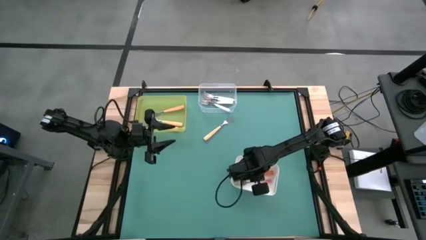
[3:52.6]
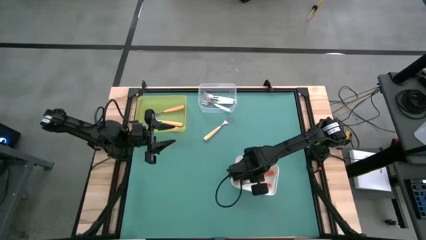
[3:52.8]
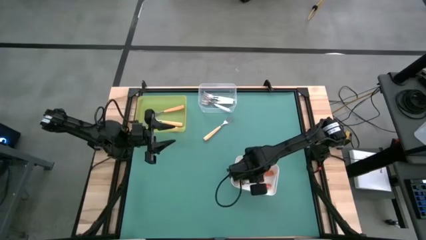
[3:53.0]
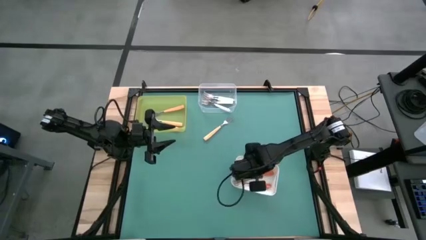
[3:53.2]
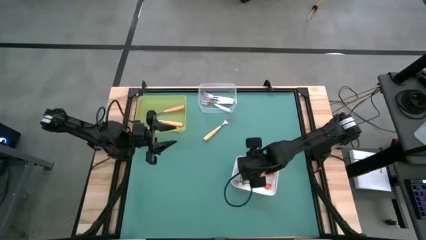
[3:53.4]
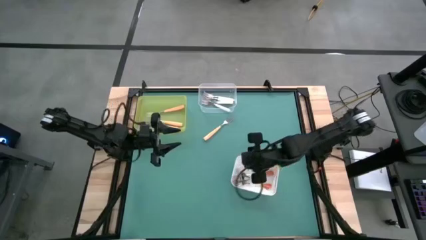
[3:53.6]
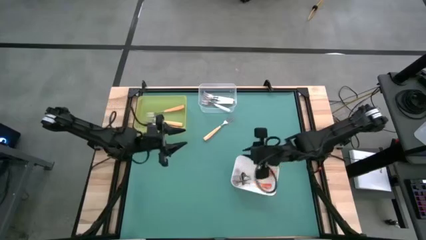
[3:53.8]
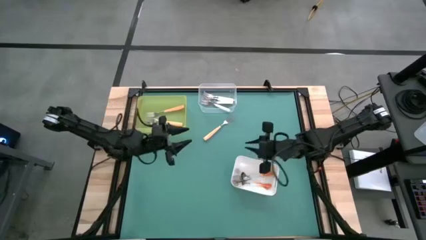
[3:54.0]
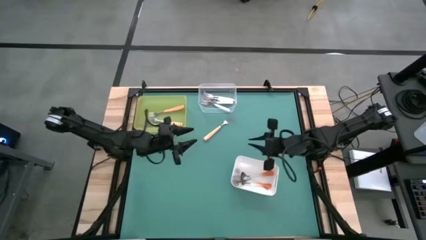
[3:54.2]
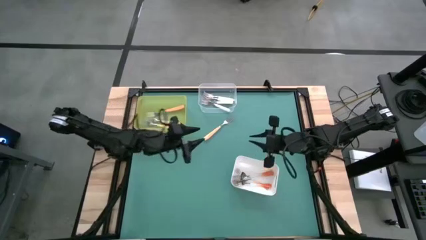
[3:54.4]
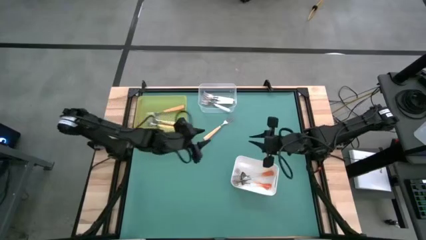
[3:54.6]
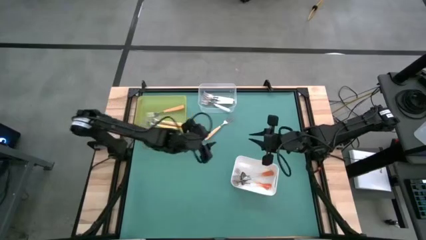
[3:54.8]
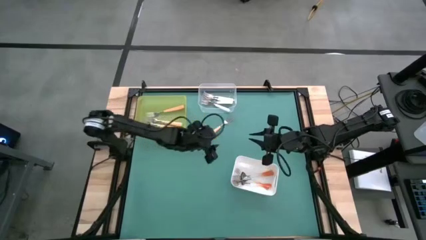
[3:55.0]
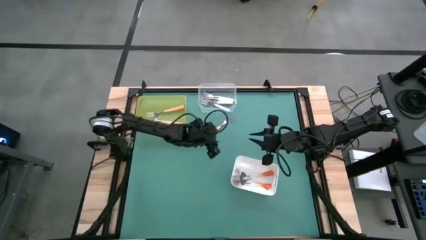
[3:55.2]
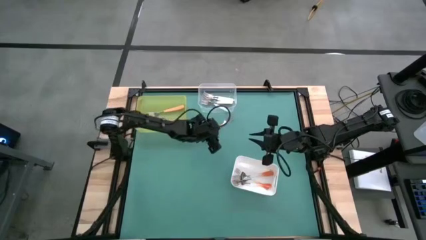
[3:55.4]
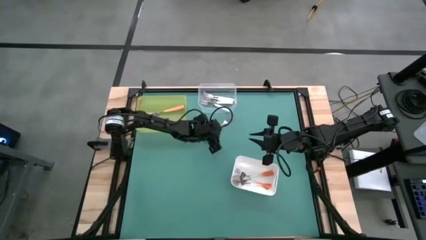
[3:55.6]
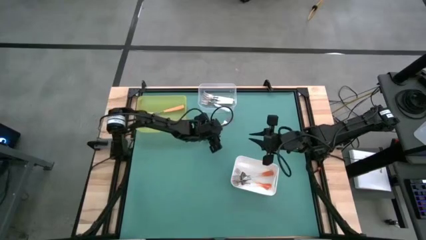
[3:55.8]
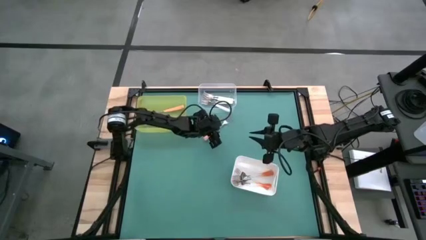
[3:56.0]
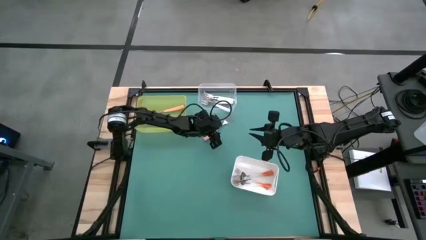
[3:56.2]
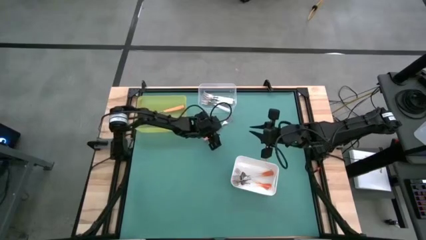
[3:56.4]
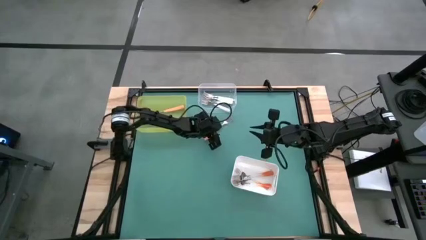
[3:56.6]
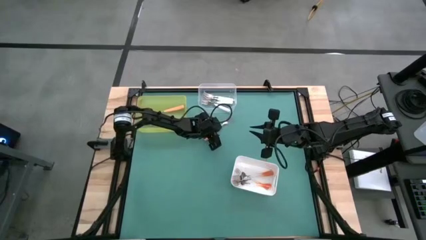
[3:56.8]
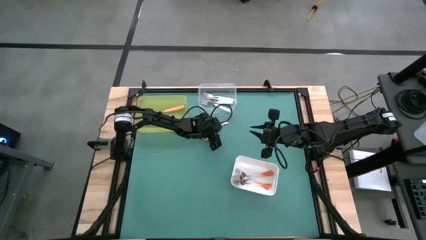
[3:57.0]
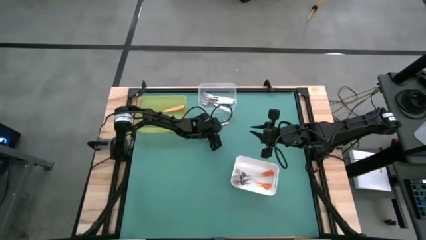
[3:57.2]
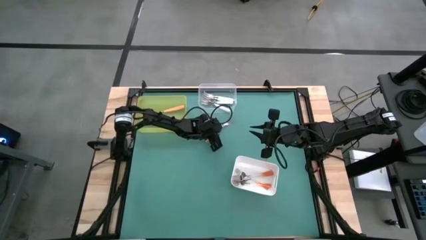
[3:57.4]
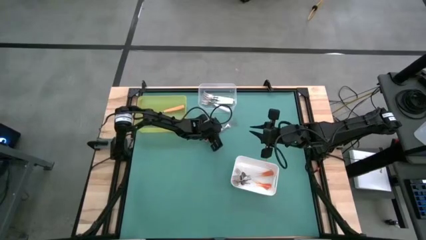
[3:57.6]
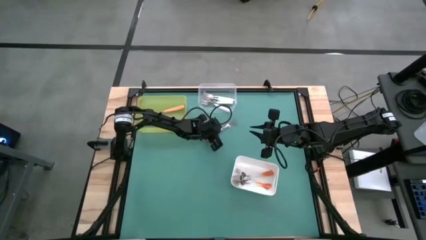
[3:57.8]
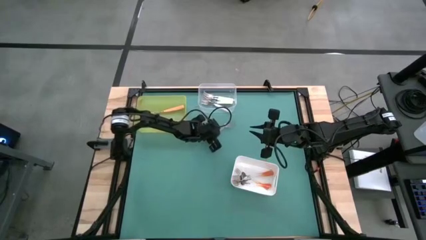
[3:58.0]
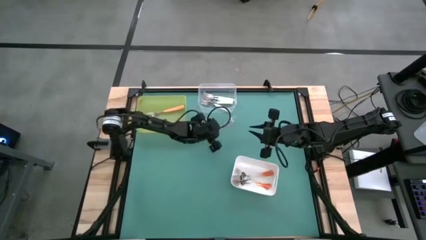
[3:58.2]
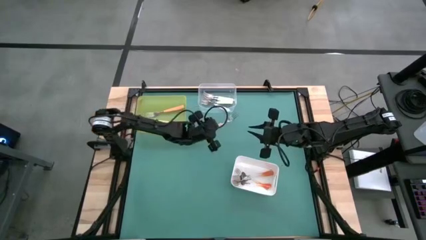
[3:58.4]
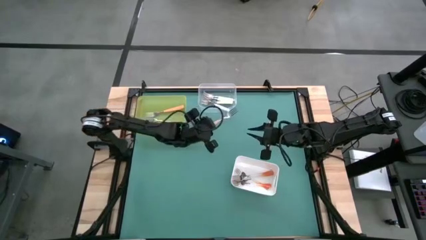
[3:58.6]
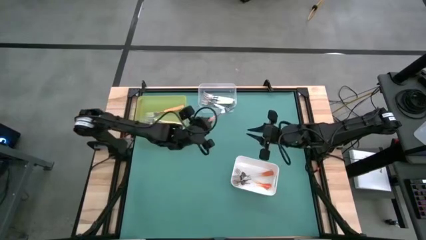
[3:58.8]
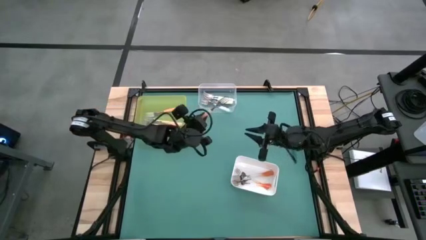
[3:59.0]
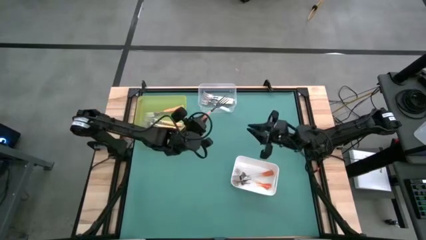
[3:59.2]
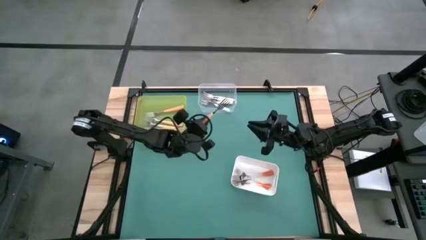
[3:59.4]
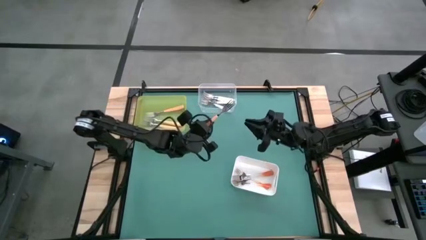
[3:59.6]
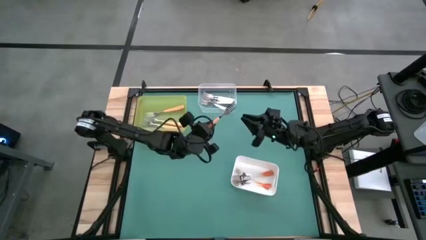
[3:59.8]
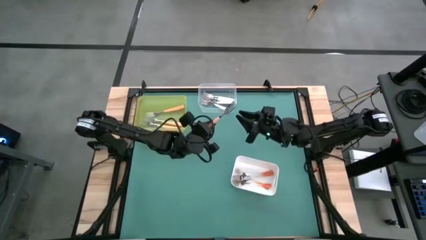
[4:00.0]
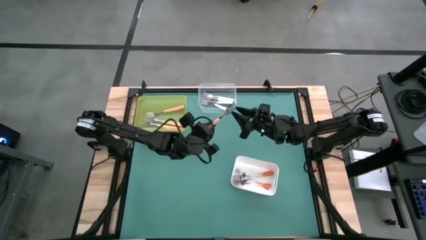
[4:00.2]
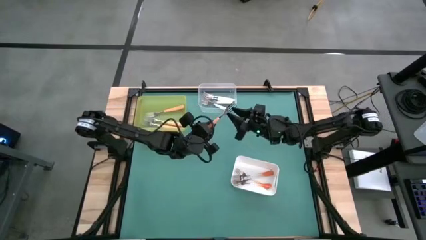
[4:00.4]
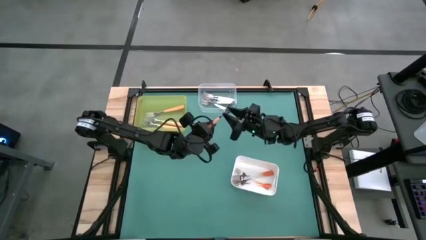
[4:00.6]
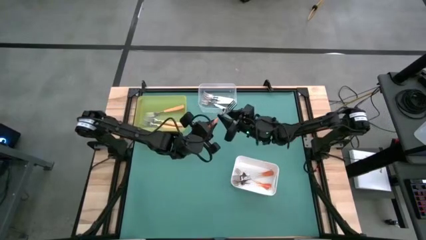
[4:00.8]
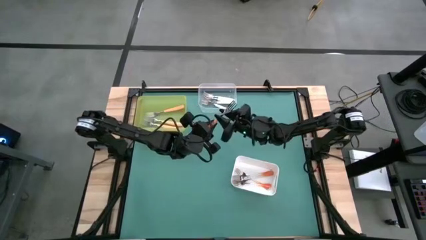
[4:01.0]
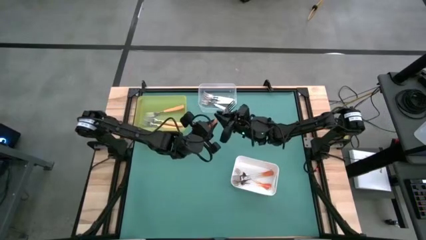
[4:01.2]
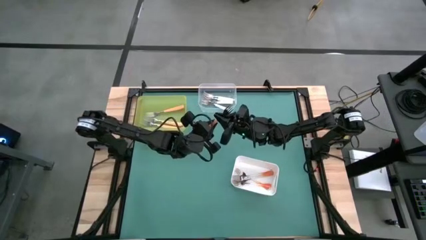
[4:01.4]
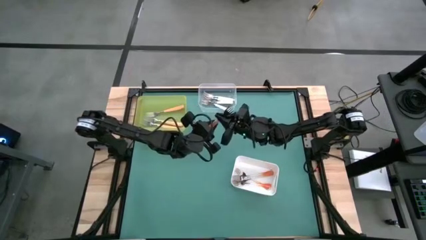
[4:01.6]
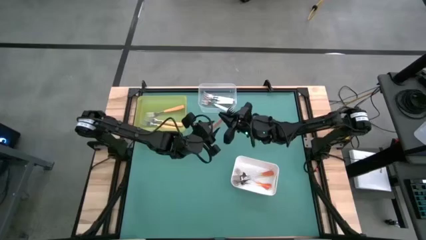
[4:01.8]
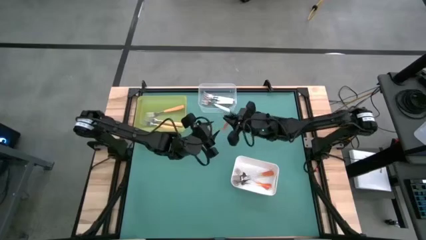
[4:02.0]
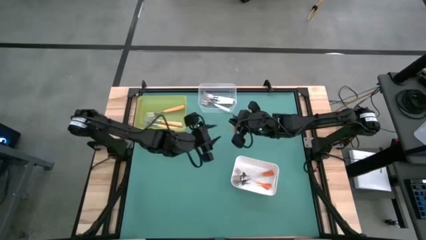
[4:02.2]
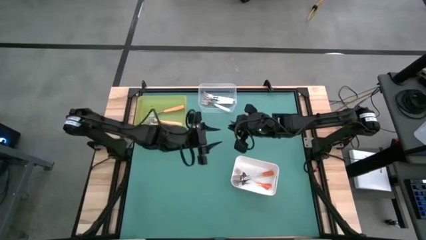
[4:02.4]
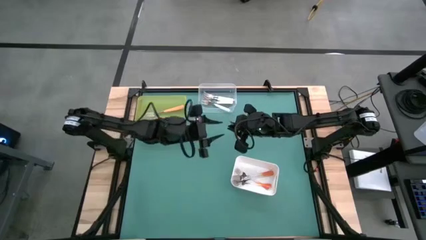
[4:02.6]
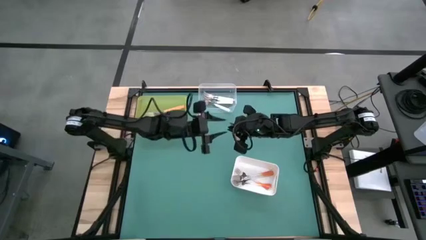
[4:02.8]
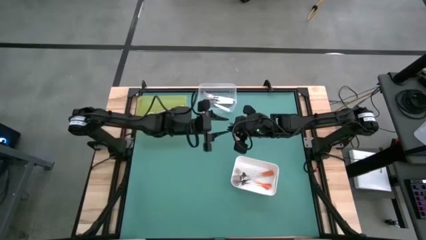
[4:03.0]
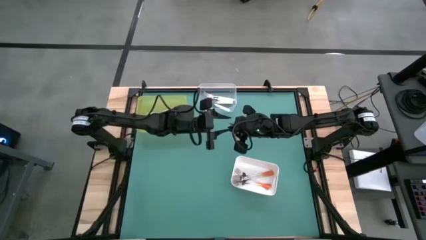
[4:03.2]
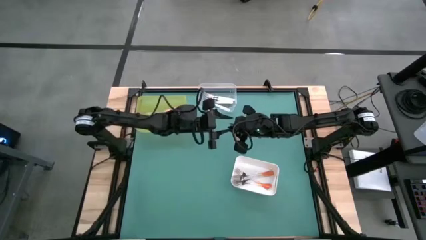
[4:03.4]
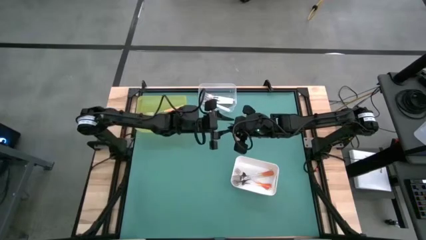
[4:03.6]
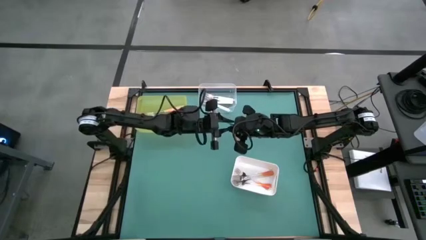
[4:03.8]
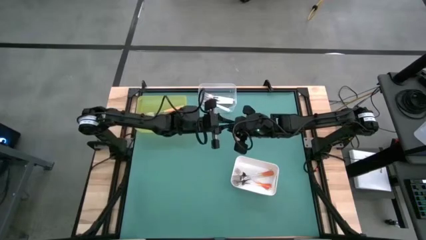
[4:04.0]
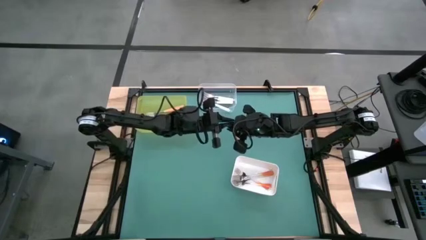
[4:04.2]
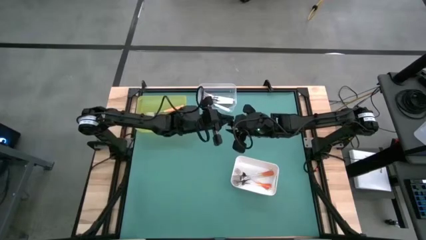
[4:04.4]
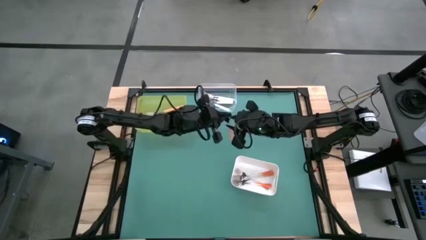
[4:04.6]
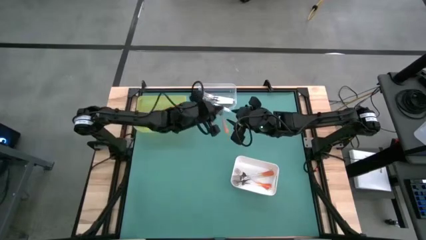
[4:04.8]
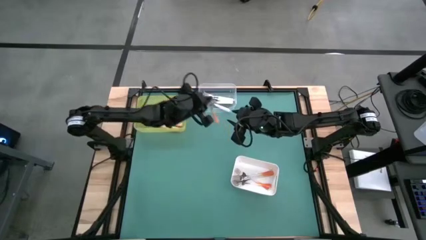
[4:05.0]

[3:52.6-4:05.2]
Task: Sort silverware by color (type)
Put the light orange into the yellow bin

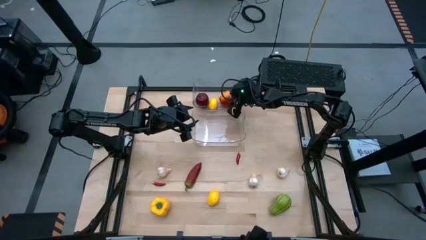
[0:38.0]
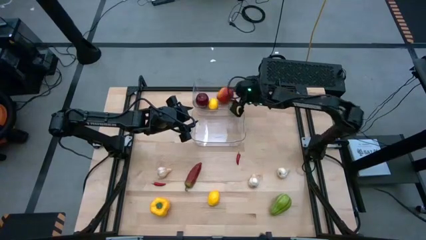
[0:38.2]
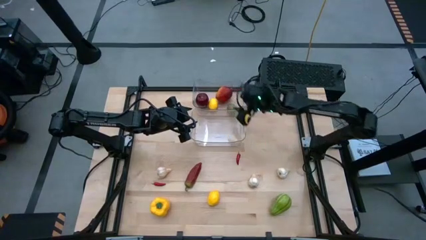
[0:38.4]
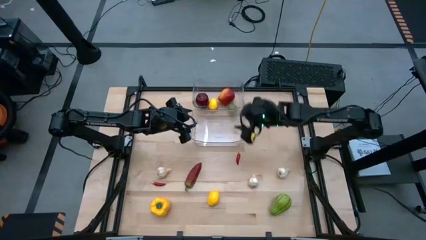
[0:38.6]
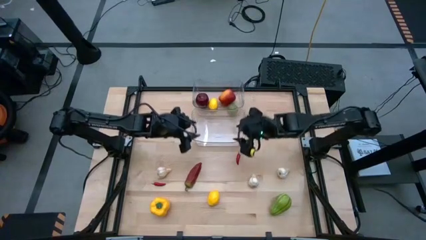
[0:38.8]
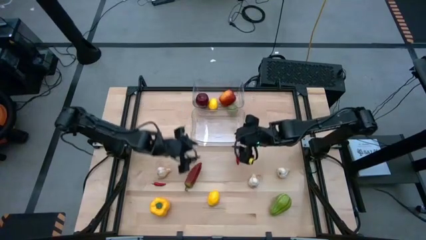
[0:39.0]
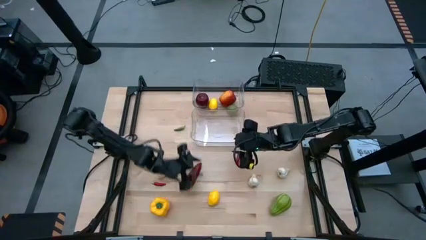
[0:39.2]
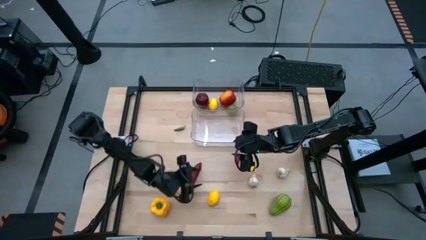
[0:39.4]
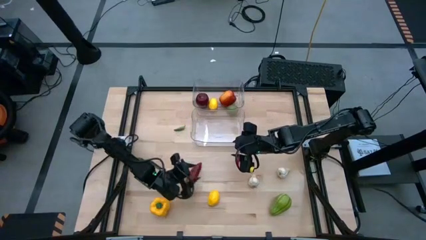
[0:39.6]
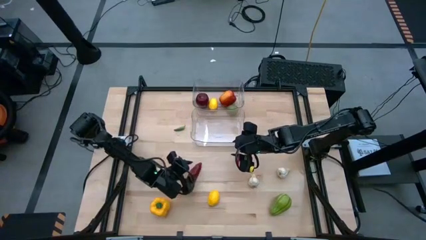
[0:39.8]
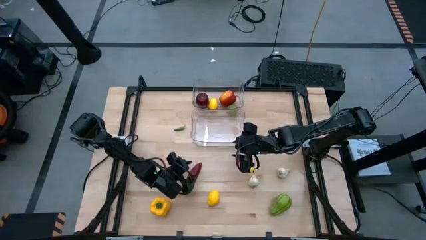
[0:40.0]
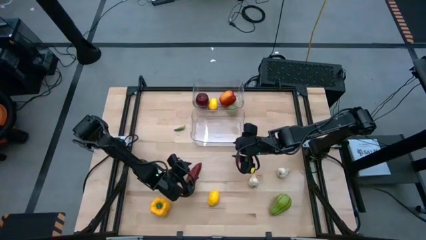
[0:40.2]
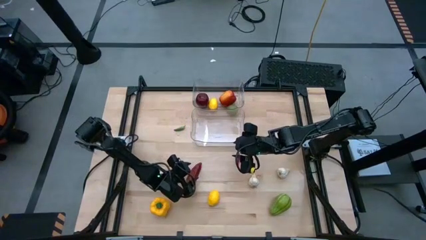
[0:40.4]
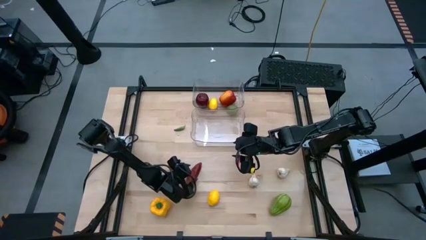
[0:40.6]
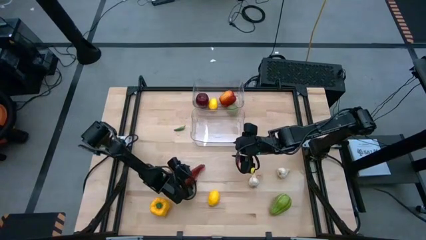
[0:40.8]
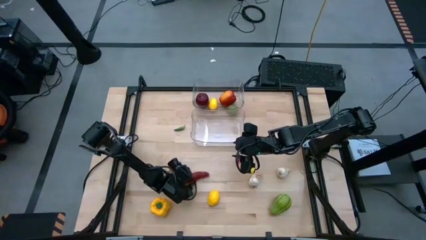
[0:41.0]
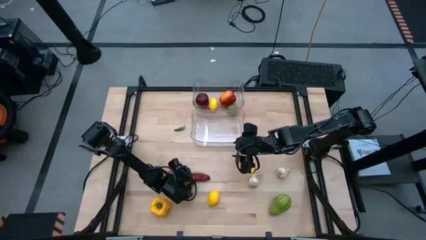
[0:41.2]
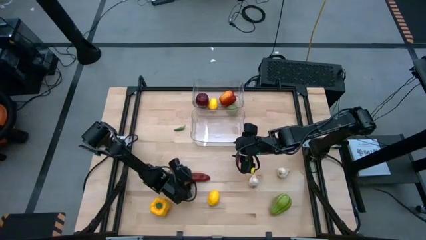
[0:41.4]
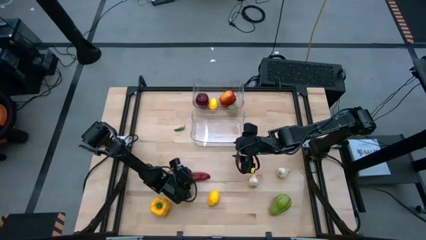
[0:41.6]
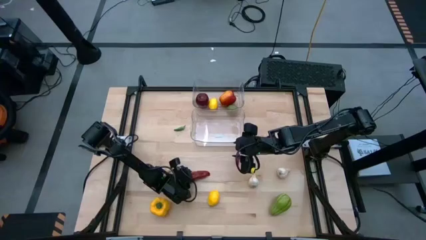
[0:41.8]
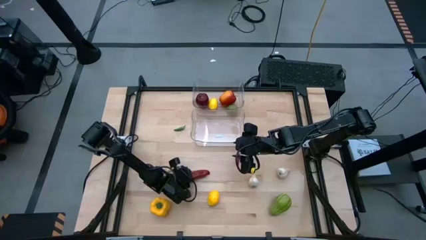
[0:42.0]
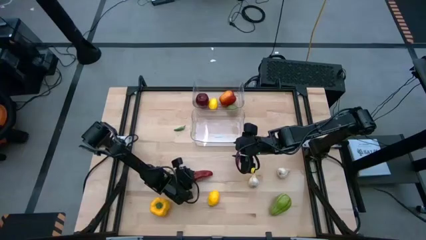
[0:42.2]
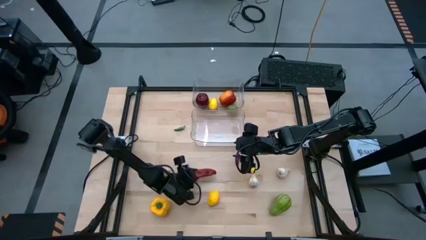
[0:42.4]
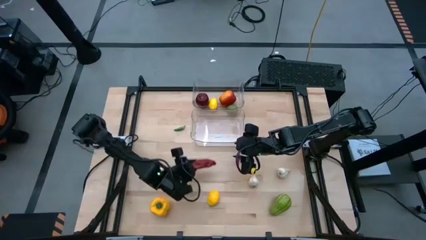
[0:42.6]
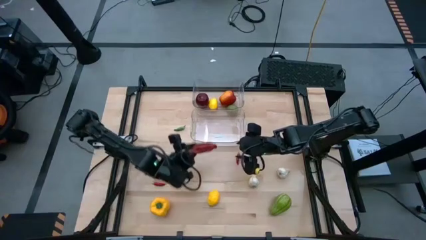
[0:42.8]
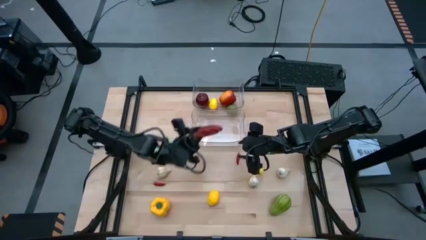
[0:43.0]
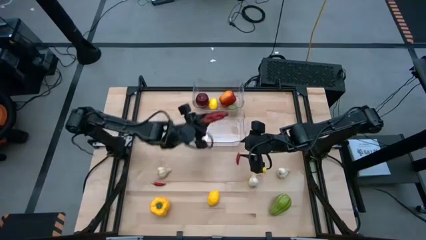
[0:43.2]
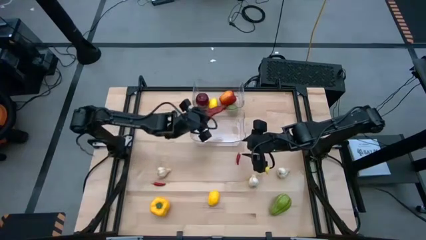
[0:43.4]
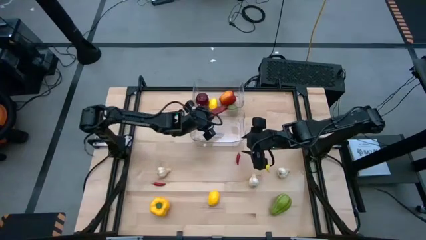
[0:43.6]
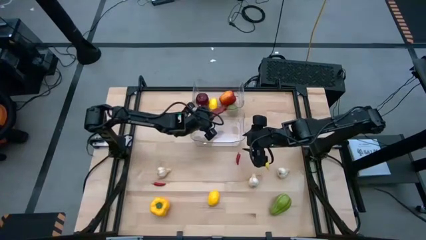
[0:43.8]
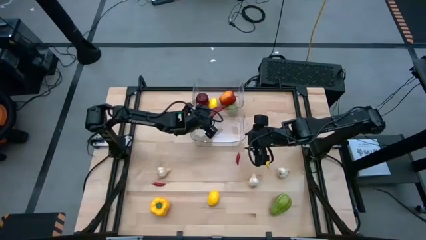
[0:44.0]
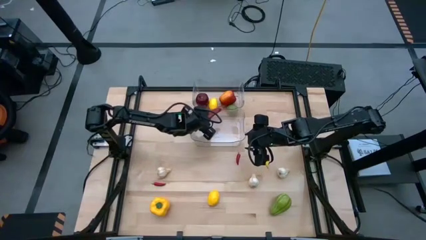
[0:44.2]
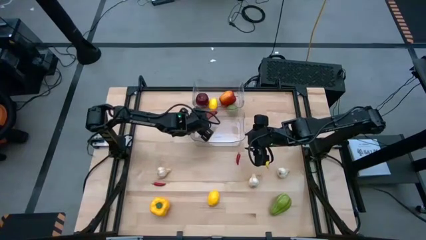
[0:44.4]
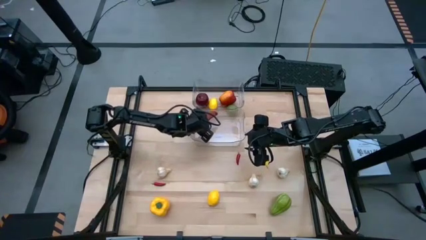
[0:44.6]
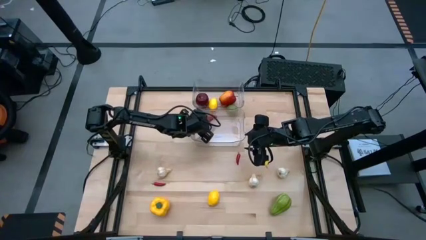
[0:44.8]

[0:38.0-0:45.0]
Task: Sort produce into baskets
Put the dark red chili pepper into the bottom transparent bin
